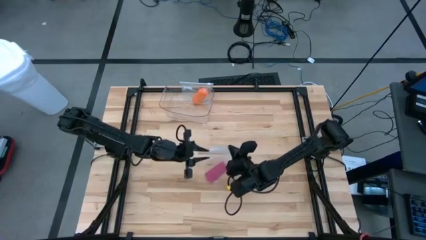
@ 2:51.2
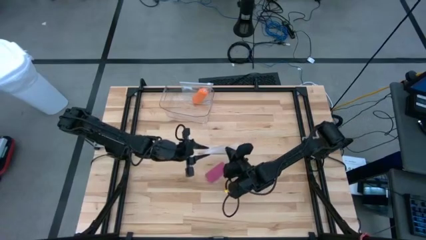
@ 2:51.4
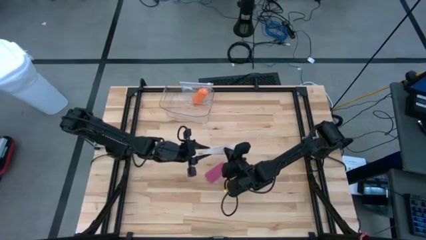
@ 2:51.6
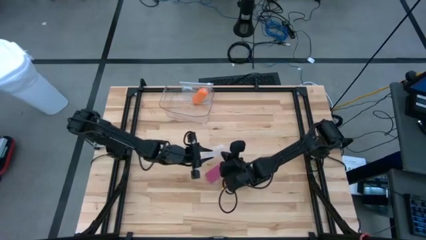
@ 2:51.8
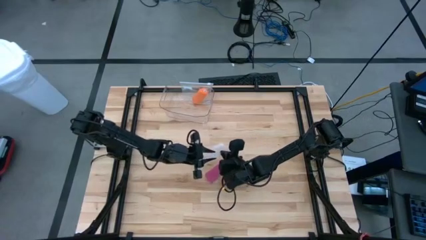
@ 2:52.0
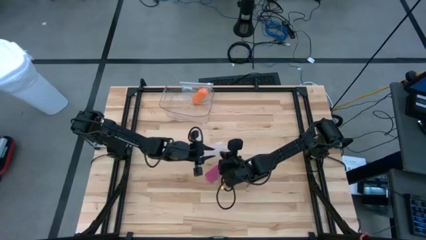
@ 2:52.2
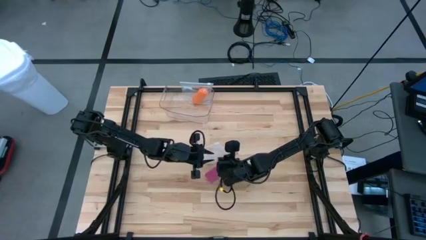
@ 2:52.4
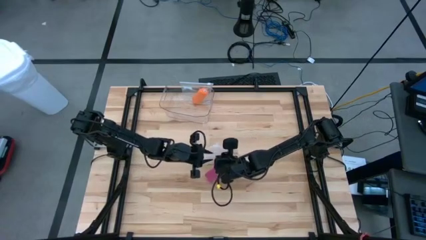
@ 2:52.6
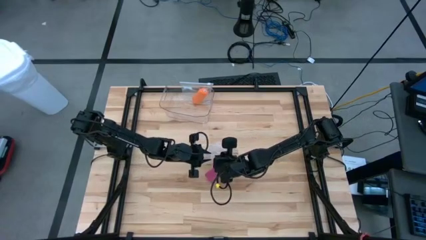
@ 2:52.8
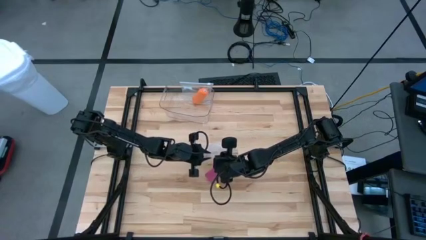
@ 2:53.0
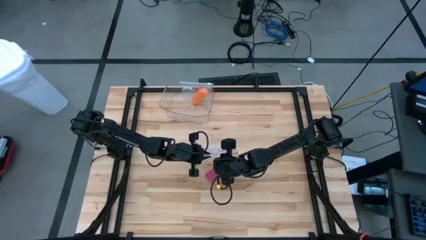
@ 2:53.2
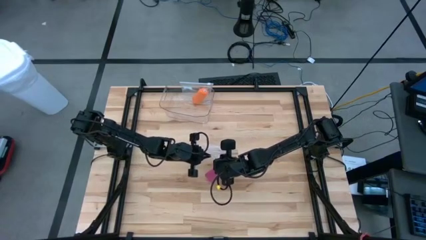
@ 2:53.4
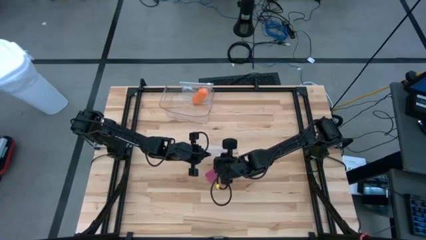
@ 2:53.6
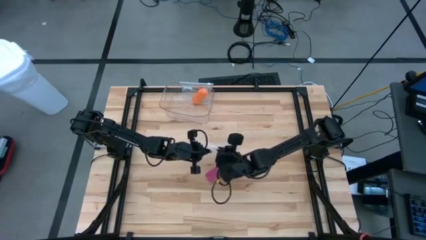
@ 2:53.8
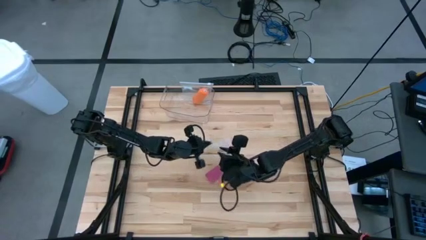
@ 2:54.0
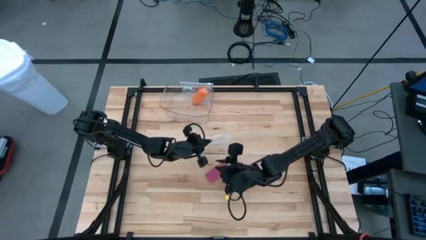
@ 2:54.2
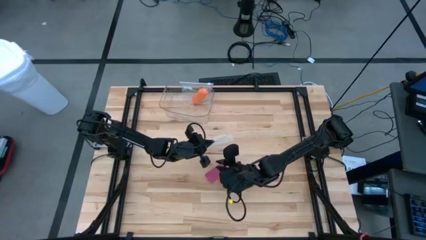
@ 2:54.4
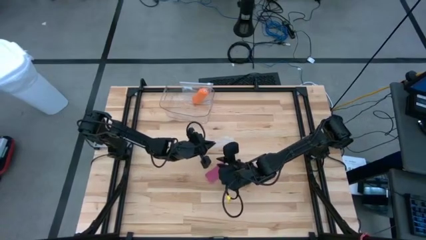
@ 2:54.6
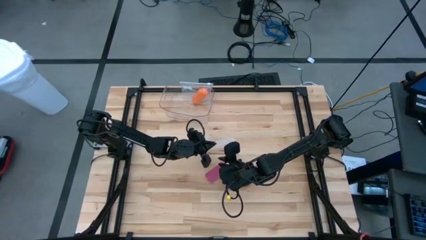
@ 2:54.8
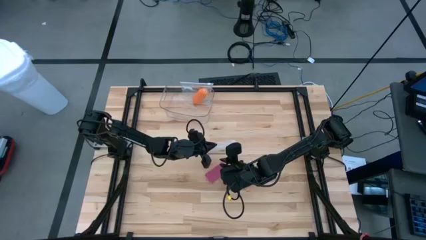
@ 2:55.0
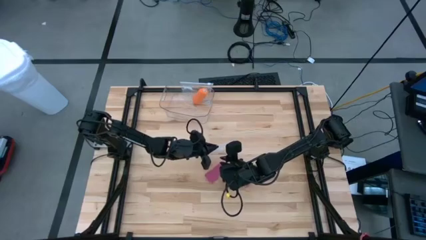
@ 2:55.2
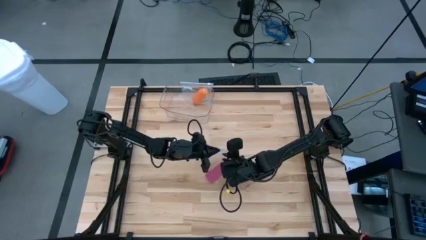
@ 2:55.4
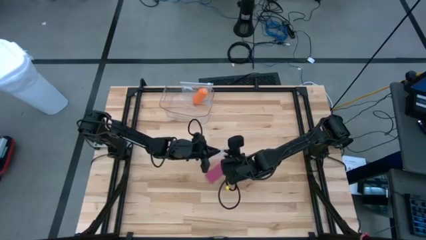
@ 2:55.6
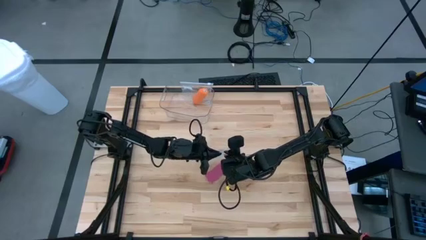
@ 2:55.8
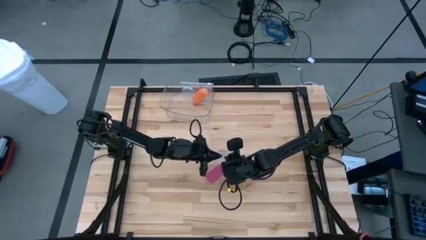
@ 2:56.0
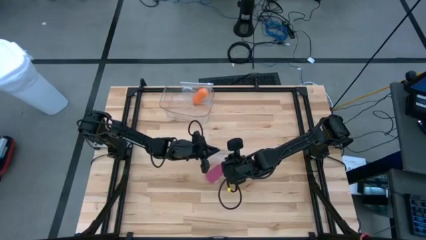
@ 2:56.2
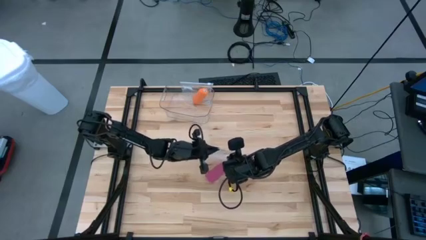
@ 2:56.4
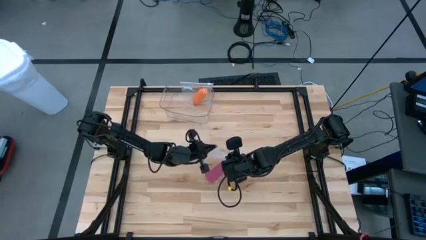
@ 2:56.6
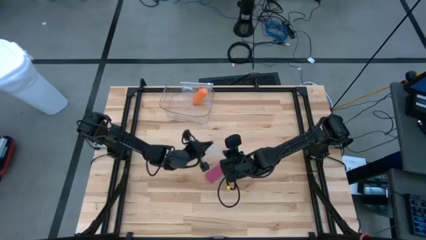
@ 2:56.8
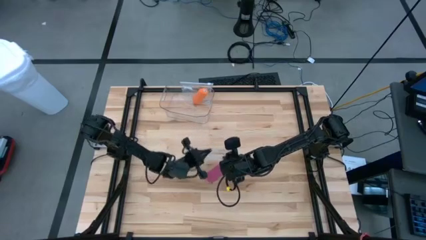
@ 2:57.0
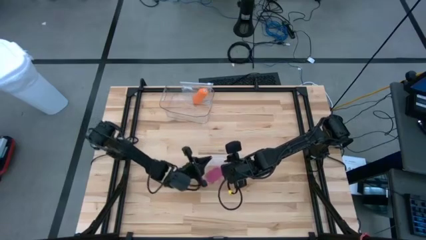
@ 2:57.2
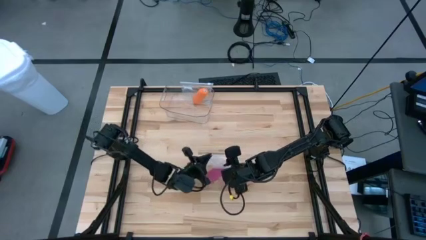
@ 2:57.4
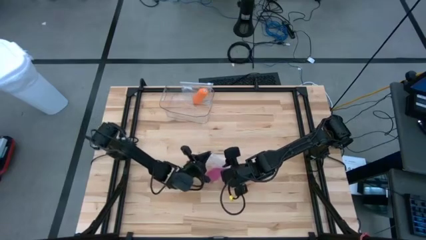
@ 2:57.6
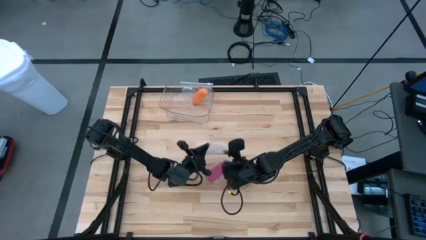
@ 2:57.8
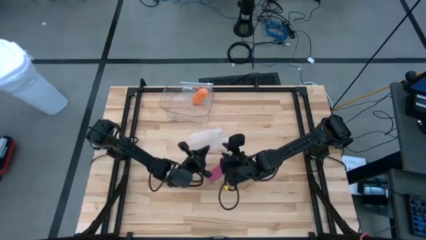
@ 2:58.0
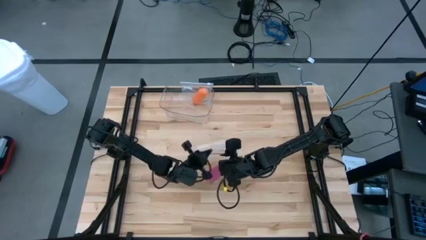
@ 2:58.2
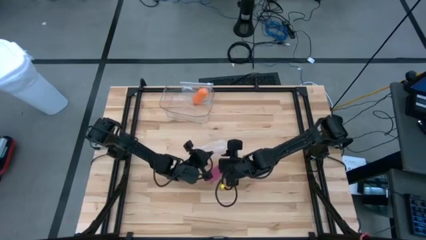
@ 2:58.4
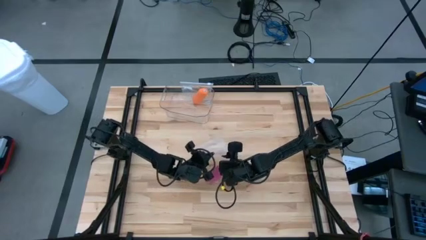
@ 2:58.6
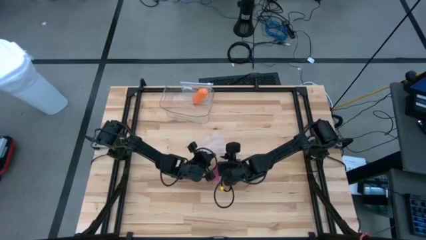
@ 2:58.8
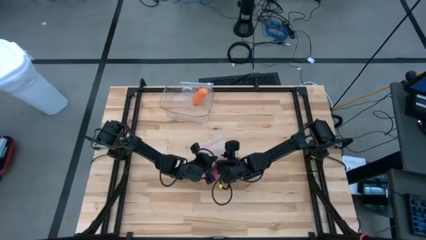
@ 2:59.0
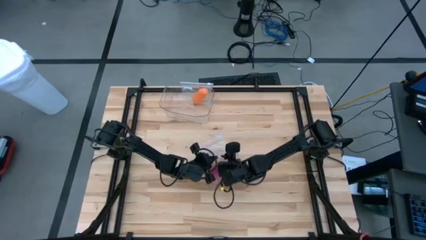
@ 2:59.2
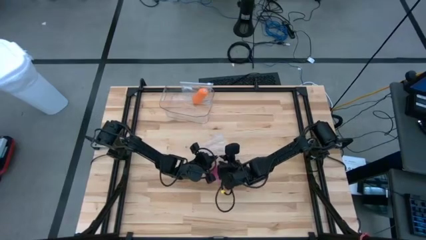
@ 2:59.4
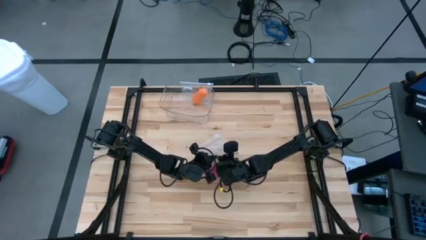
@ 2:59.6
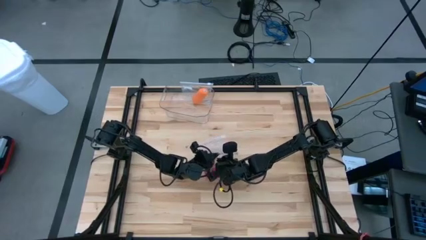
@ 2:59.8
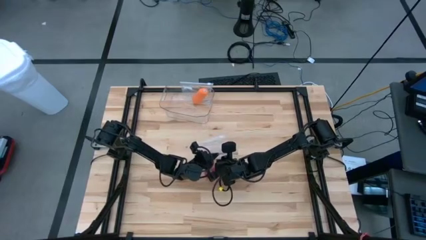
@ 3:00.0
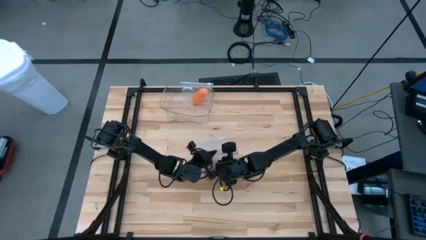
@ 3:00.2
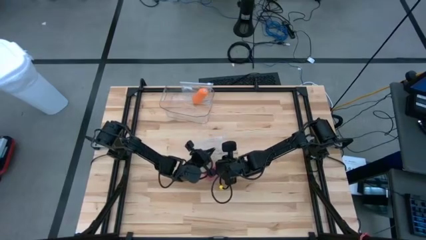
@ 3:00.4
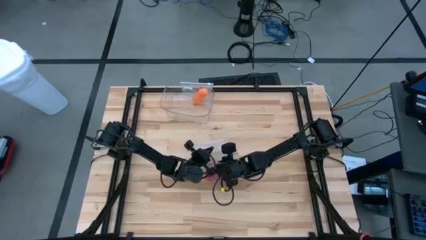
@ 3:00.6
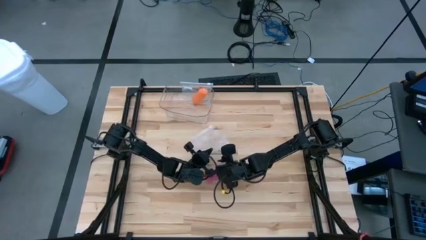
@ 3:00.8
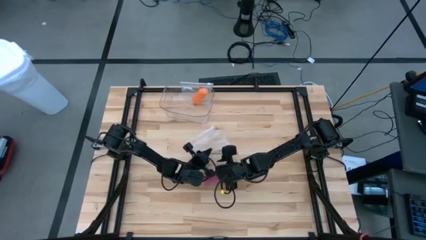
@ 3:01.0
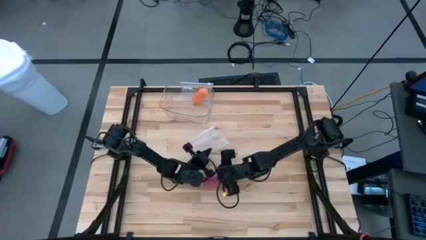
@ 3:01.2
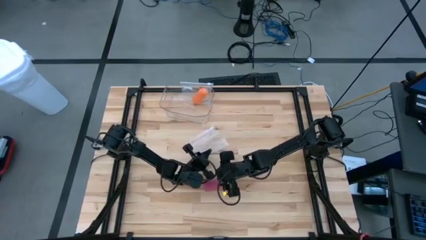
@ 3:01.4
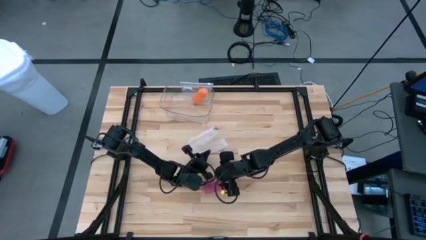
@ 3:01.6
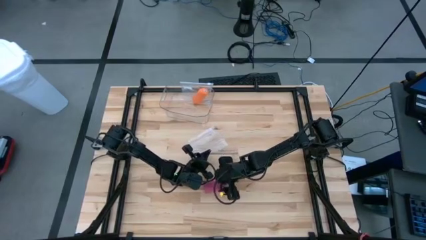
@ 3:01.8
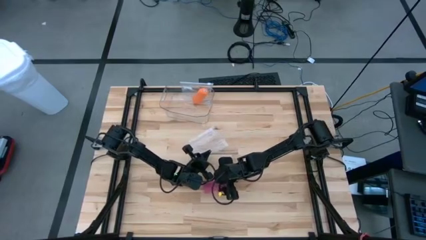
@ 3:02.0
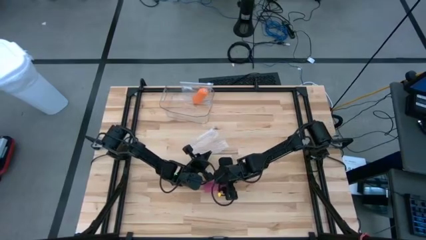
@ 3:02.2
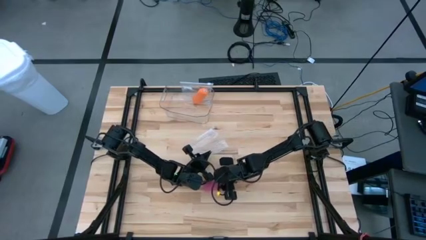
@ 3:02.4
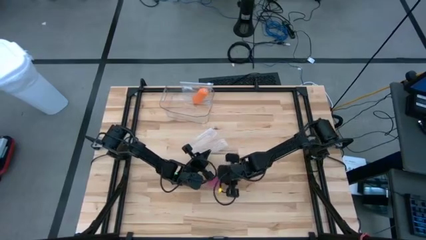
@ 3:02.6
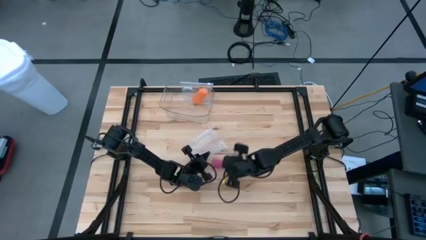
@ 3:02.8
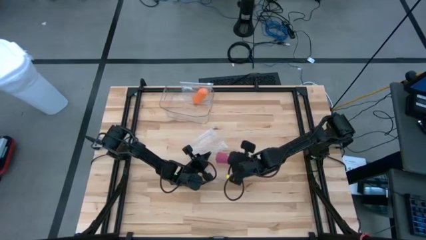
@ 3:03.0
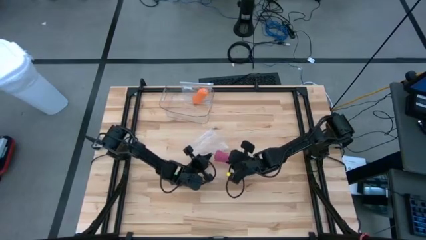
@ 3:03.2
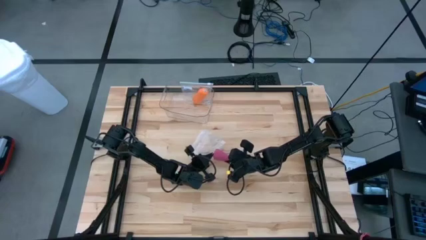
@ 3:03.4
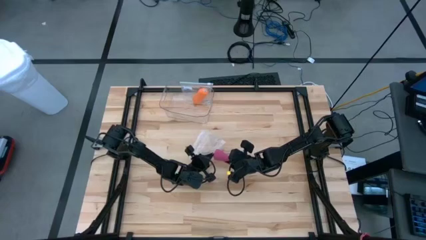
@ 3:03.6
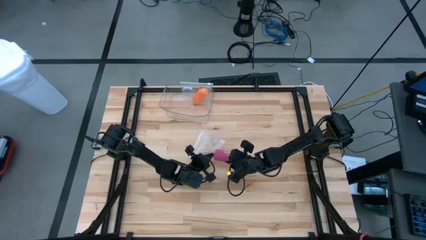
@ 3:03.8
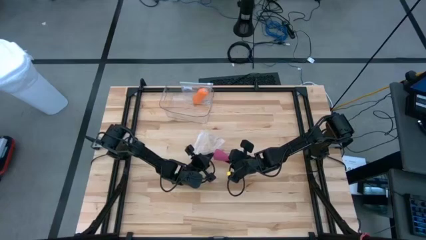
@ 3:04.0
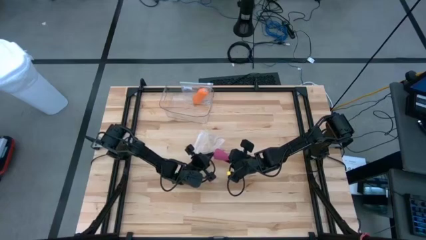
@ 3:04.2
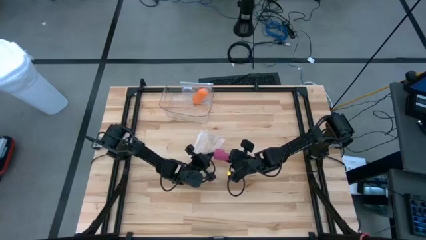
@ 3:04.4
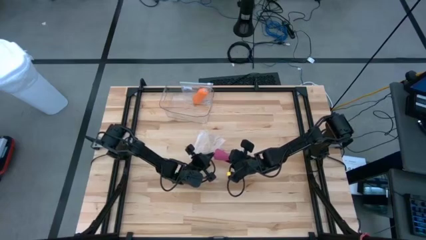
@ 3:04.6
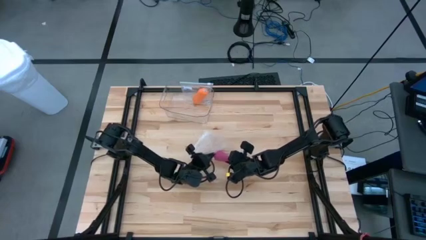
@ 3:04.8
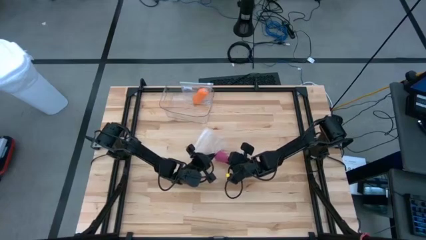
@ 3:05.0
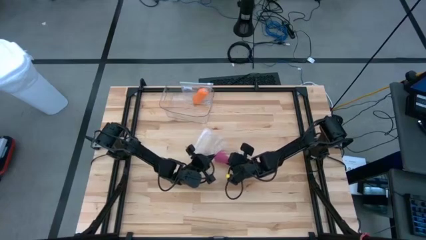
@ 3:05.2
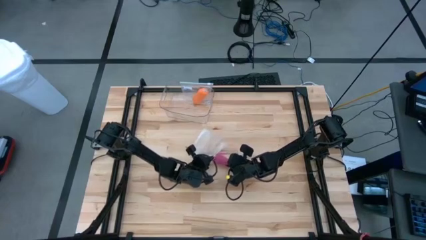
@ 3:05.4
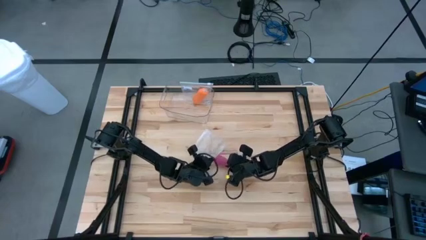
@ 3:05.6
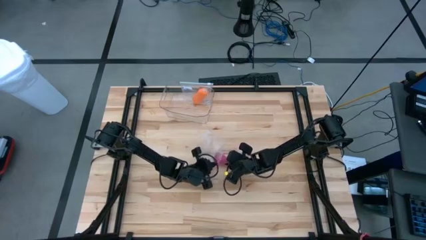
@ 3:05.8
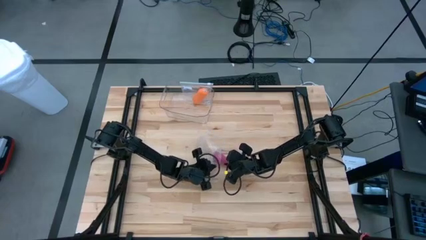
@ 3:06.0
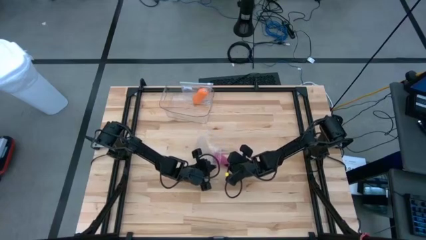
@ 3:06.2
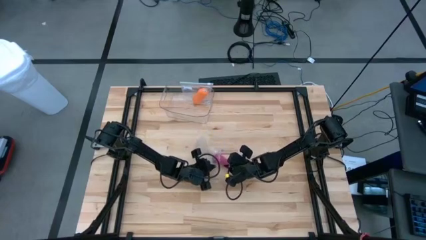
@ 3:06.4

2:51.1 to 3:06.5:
Task: Roll bandage
Put the rolled pink bandage into the transparent zip bag
